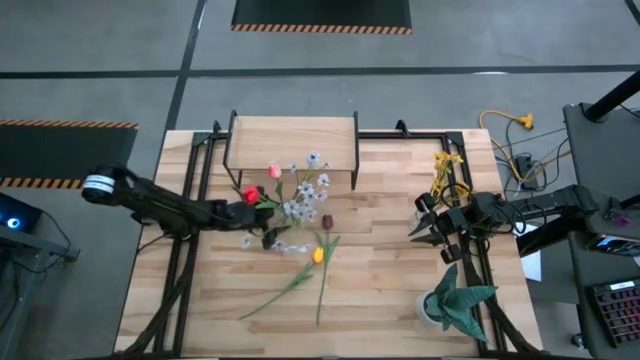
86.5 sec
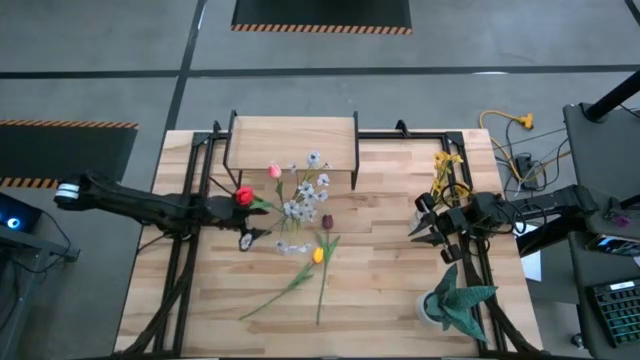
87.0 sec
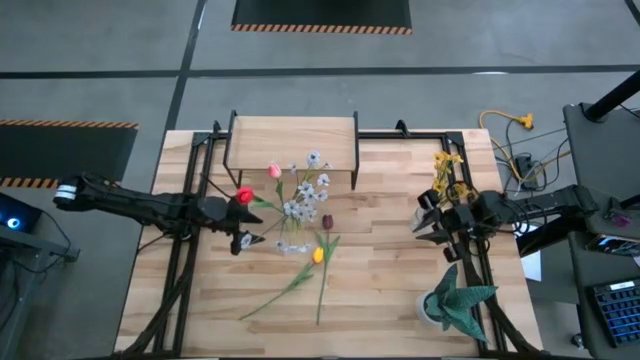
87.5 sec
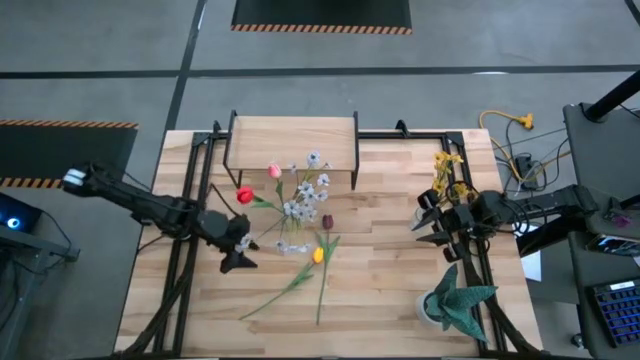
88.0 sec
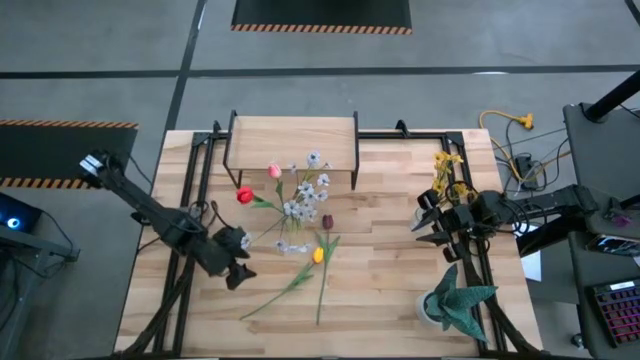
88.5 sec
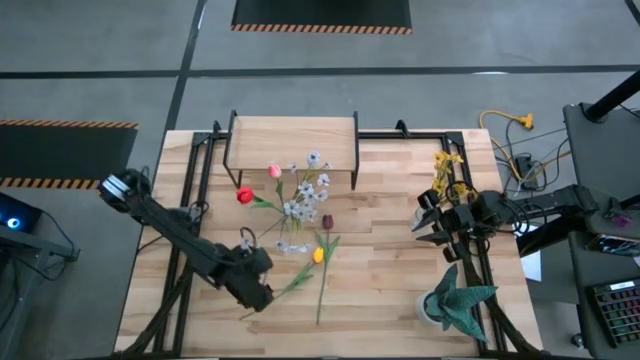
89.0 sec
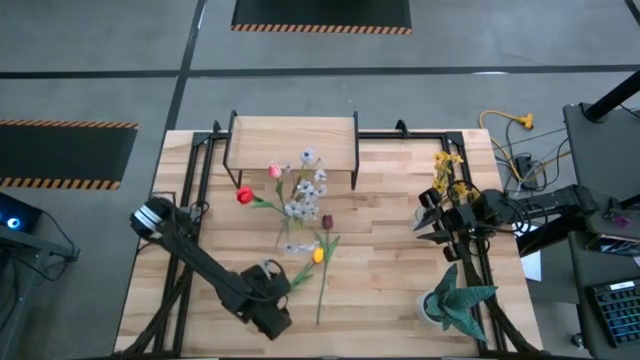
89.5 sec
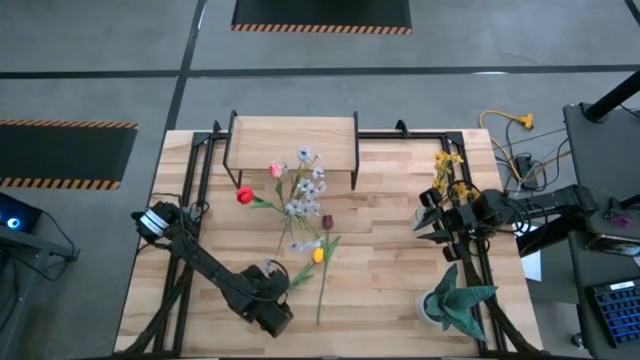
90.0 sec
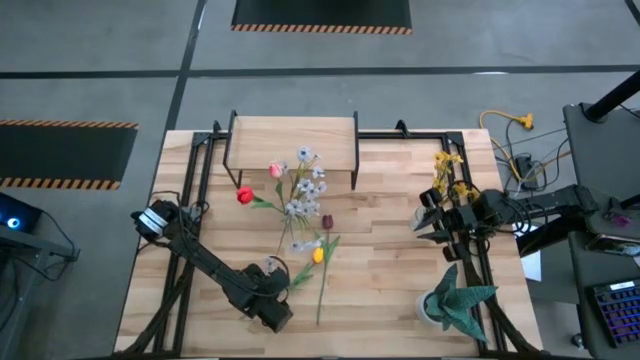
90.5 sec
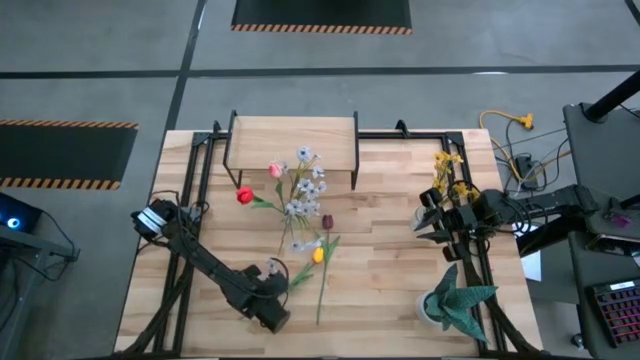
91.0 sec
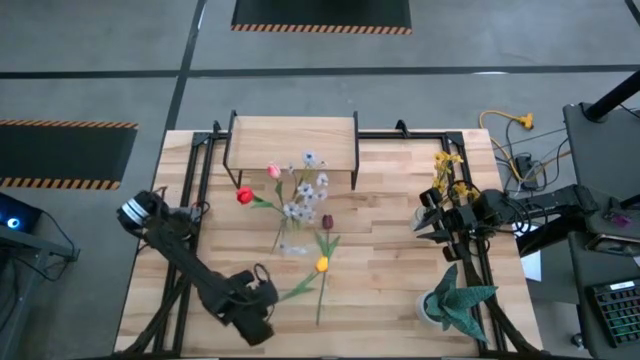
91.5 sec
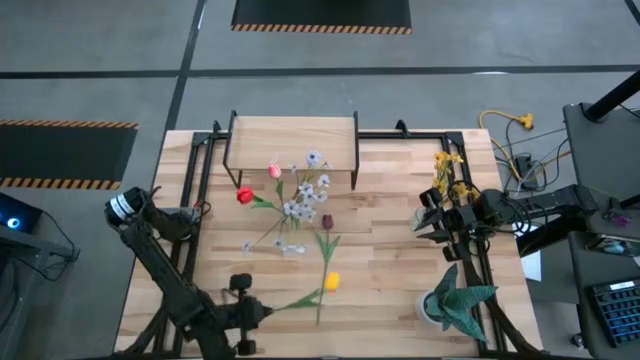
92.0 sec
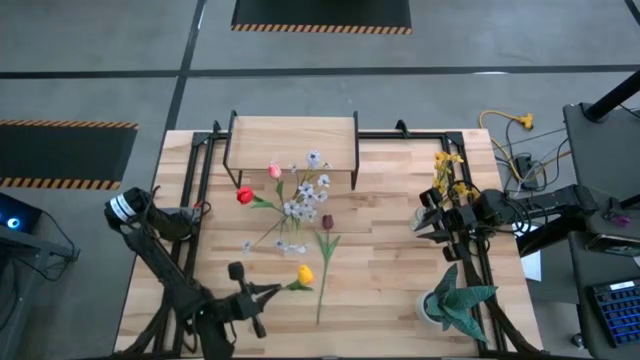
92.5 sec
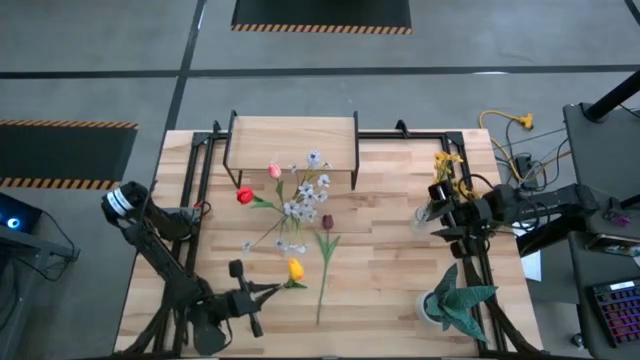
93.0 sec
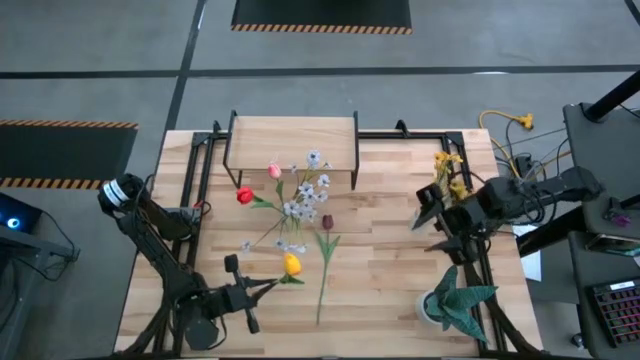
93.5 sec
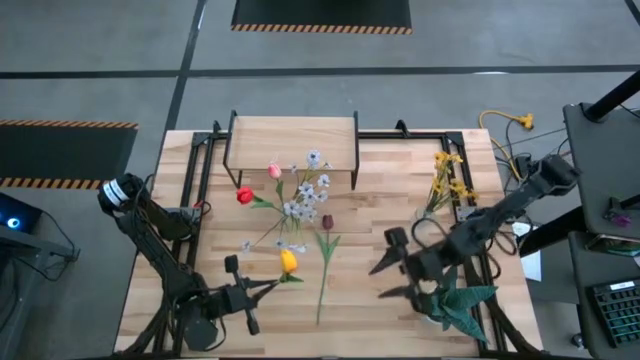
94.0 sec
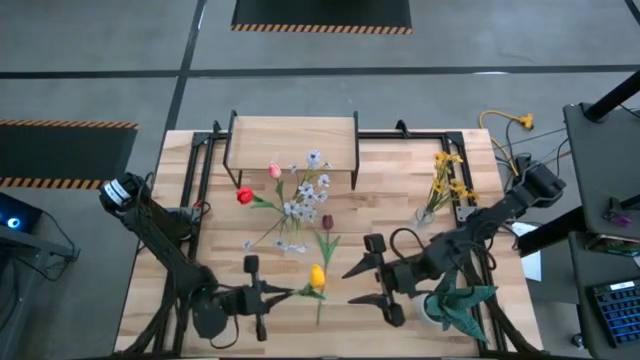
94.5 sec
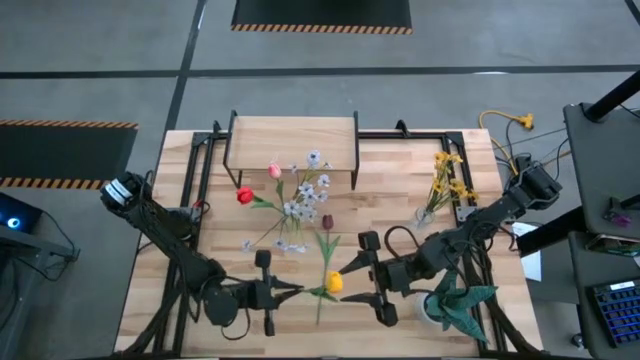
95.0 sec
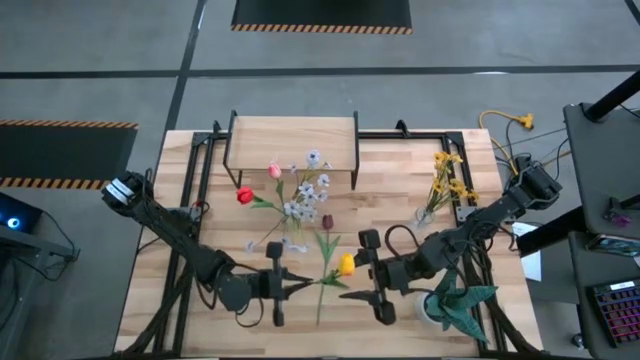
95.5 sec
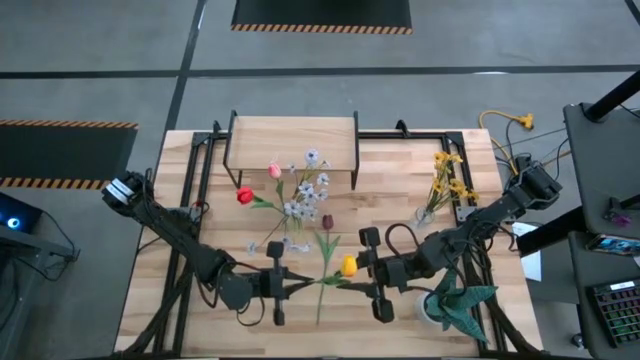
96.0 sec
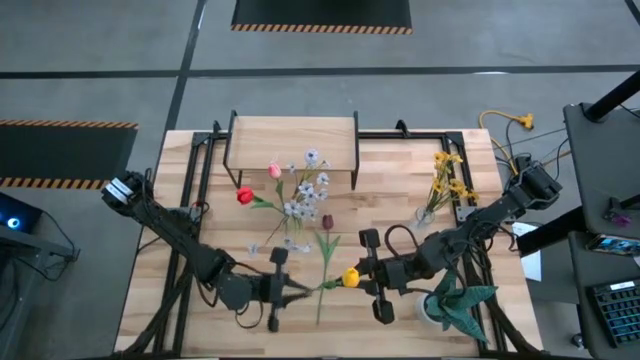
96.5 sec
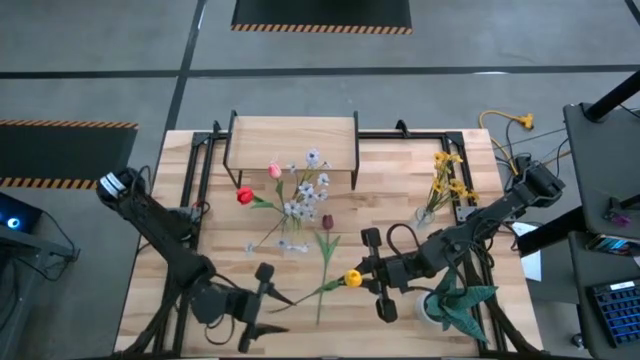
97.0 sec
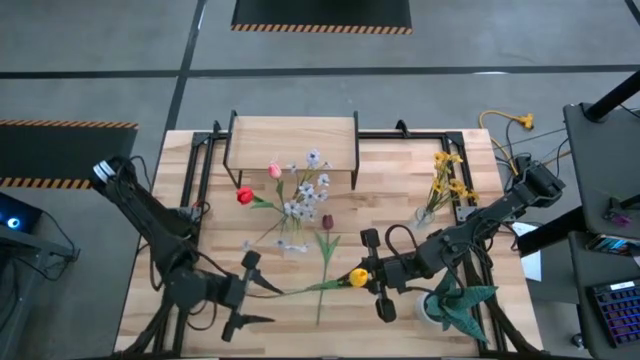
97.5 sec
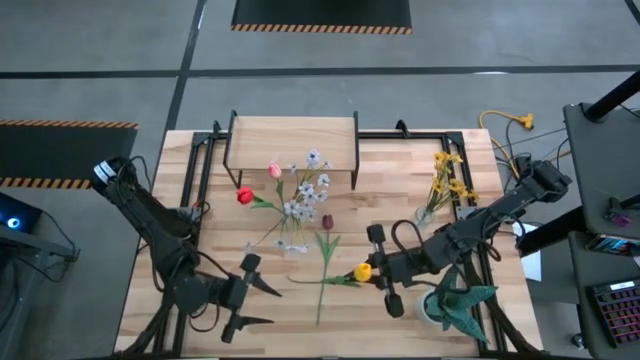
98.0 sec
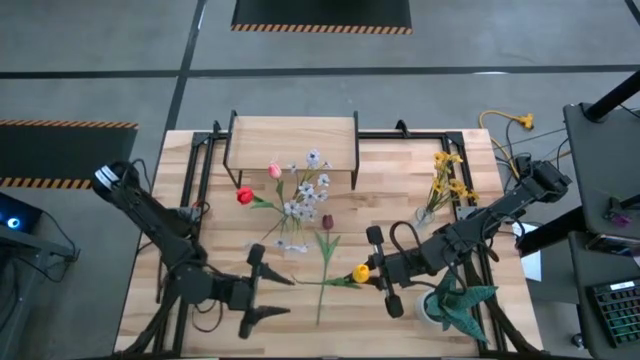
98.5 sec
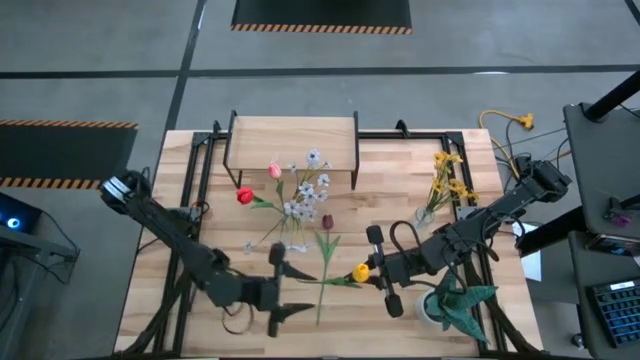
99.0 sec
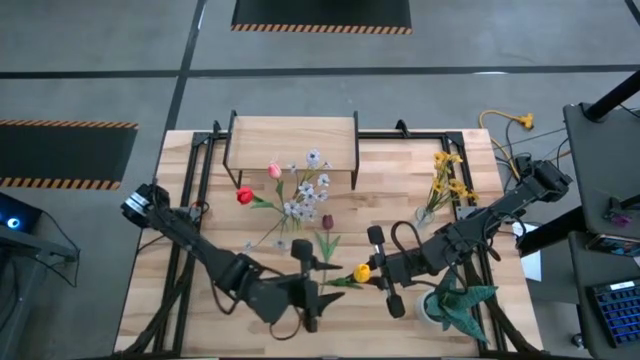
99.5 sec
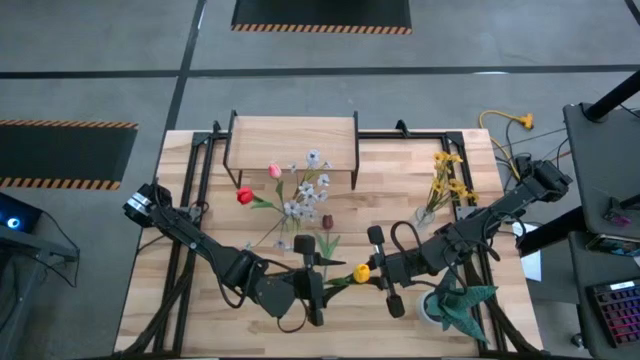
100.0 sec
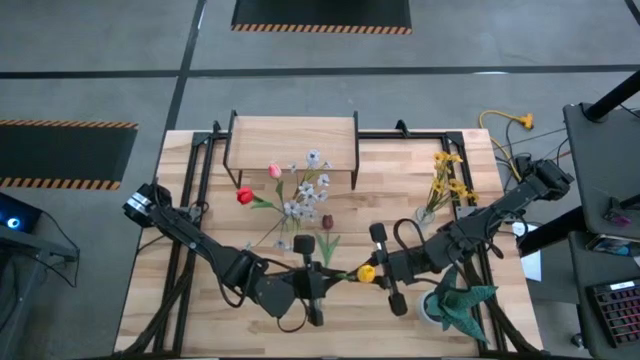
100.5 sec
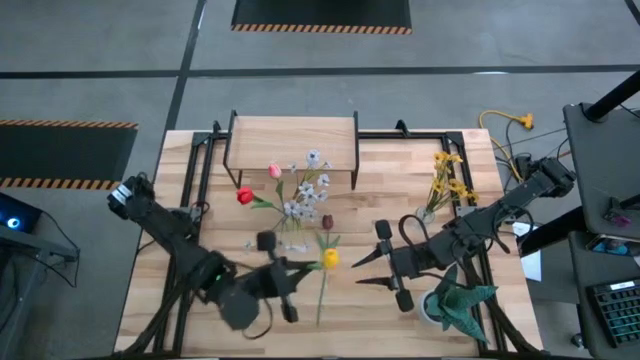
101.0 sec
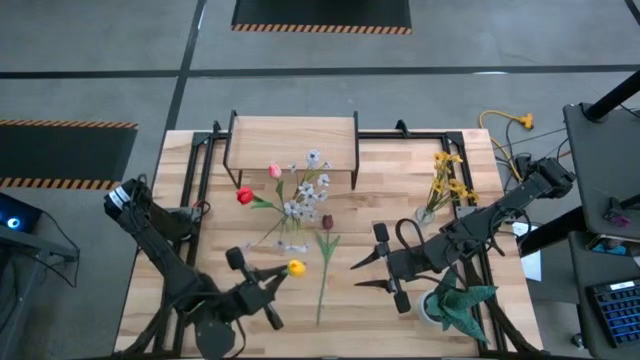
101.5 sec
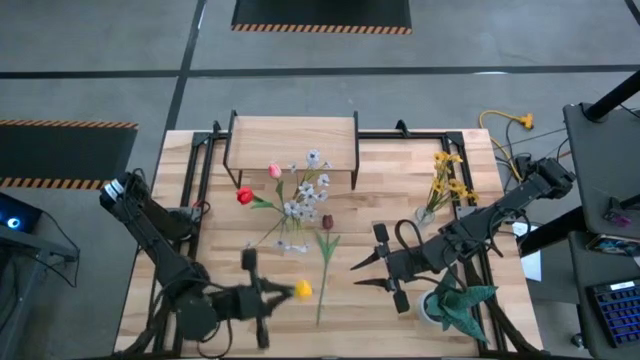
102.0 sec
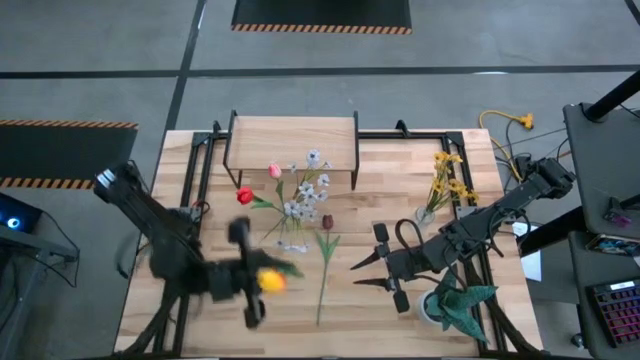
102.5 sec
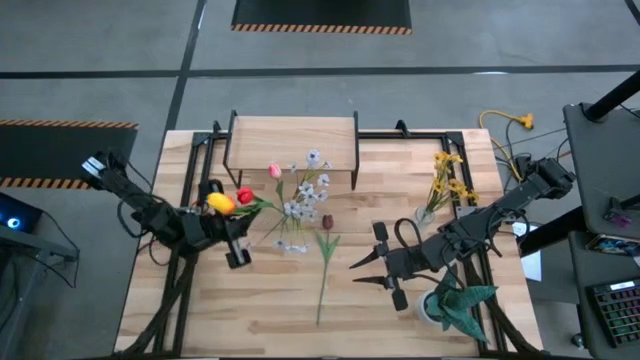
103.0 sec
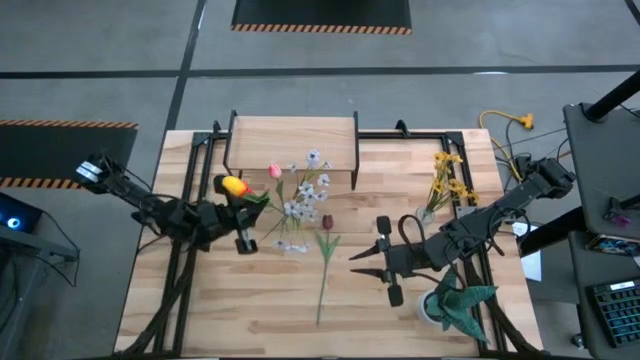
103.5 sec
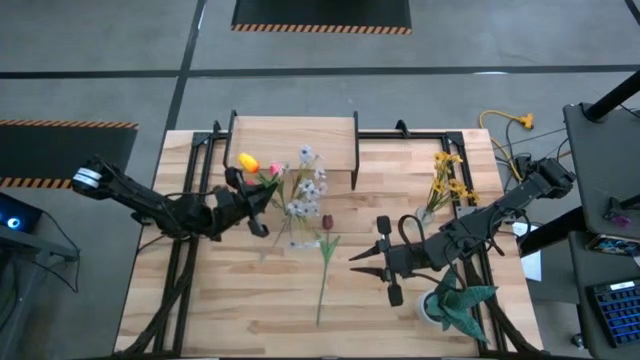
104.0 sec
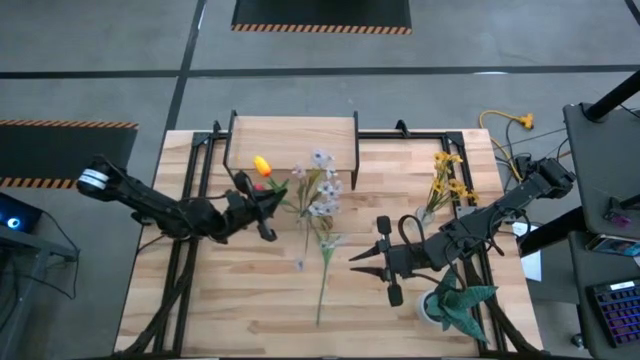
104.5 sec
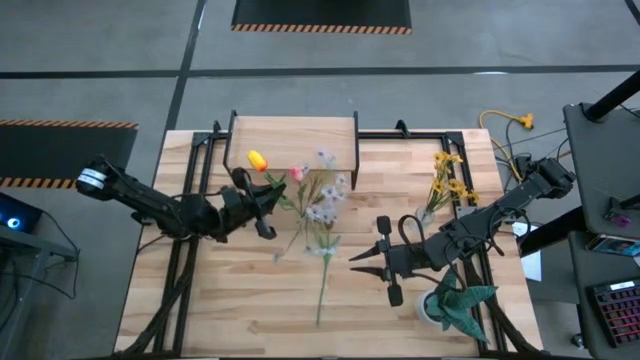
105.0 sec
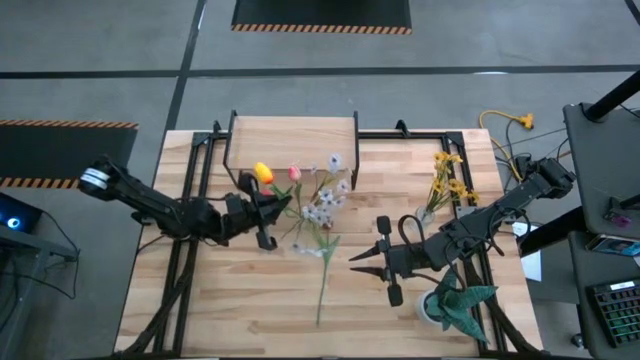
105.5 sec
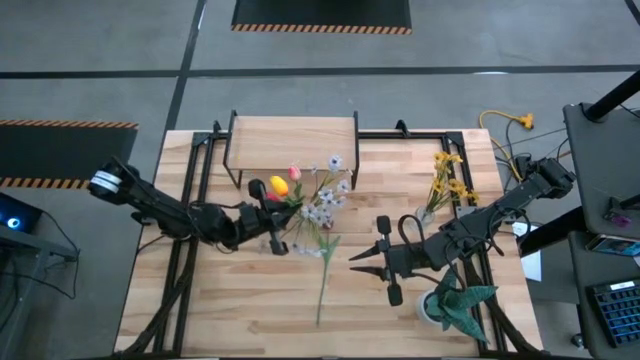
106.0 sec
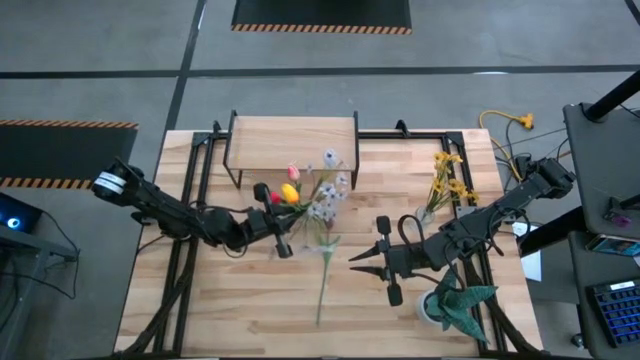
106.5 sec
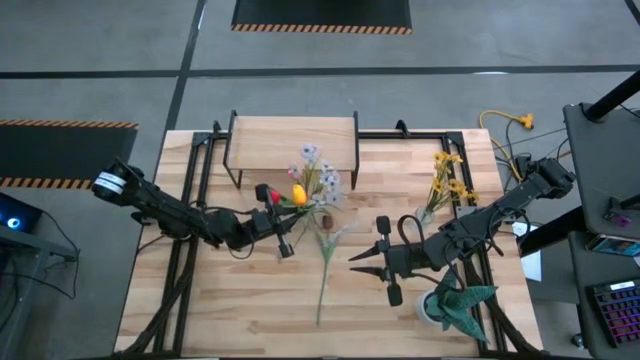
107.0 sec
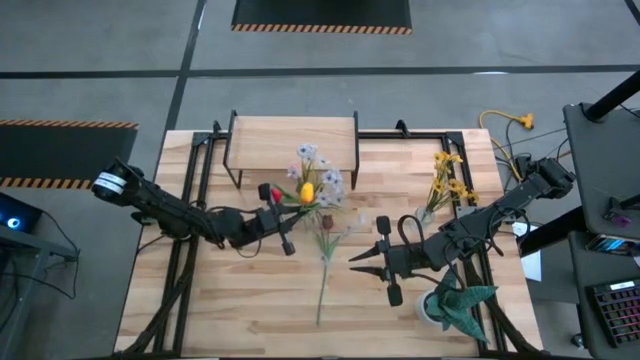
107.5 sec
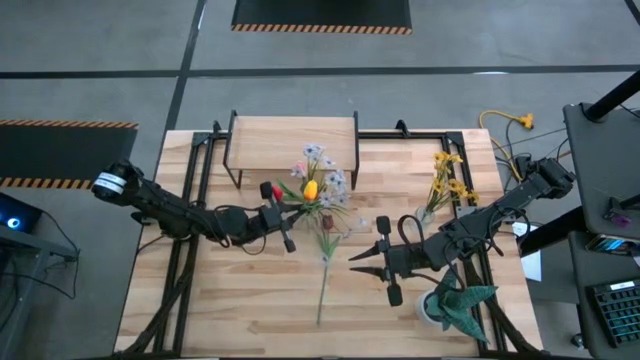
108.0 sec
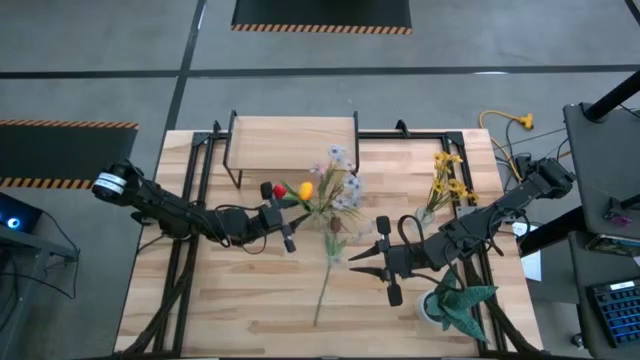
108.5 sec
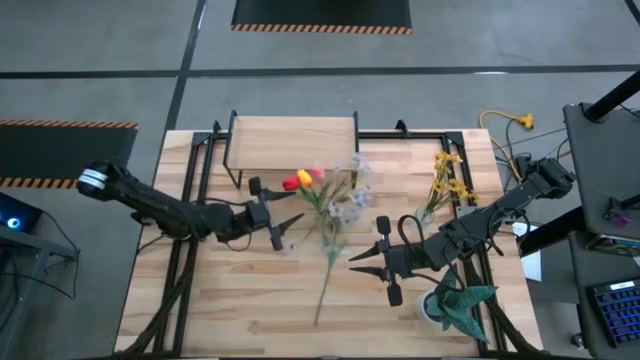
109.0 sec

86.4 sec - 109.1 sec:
Task: Pick and place flowers into a vace then onto a shelf
Put the yellow flower into the left transparent vase
